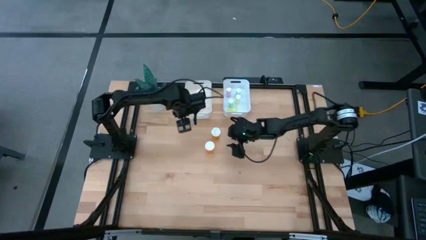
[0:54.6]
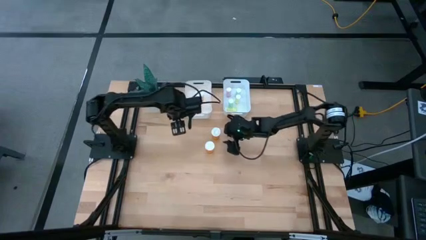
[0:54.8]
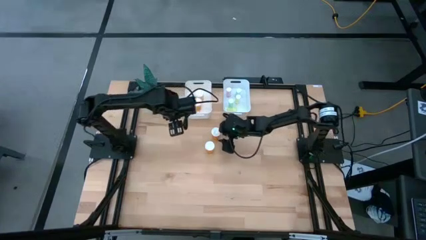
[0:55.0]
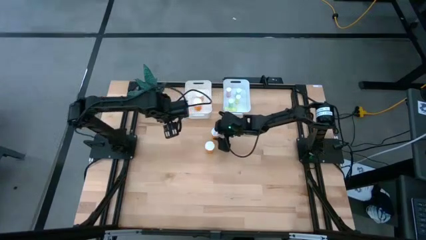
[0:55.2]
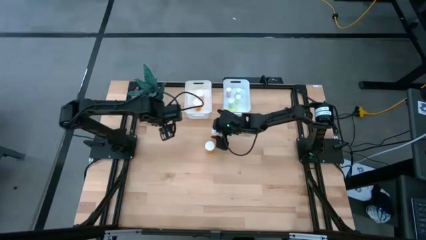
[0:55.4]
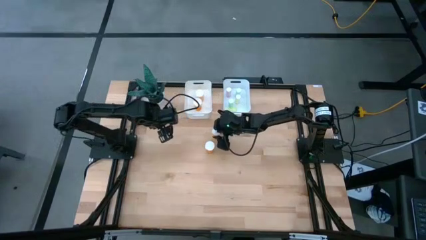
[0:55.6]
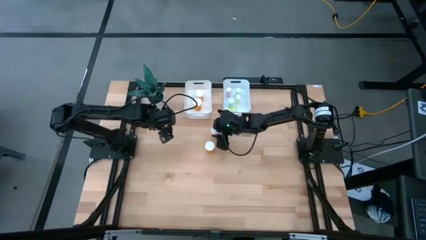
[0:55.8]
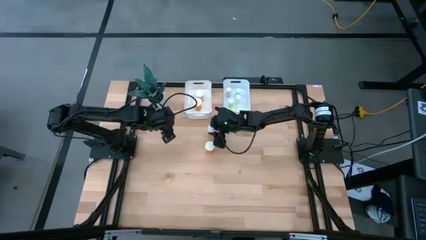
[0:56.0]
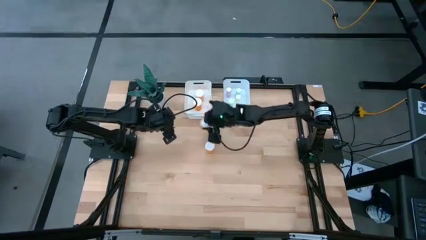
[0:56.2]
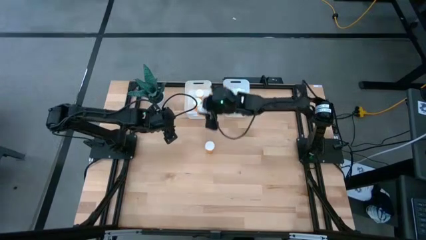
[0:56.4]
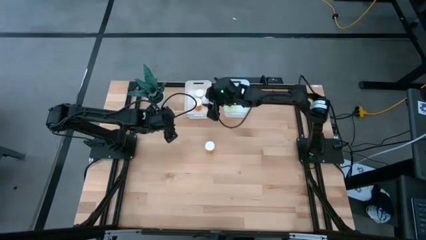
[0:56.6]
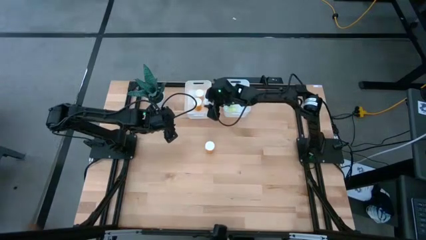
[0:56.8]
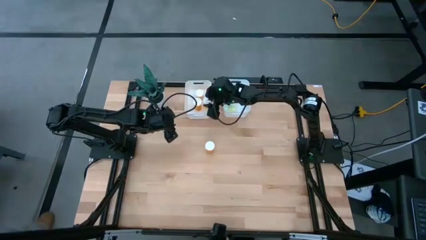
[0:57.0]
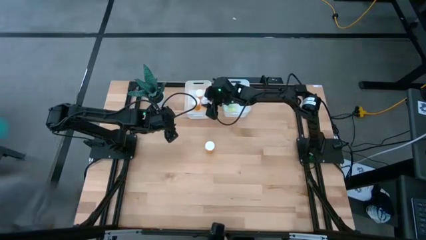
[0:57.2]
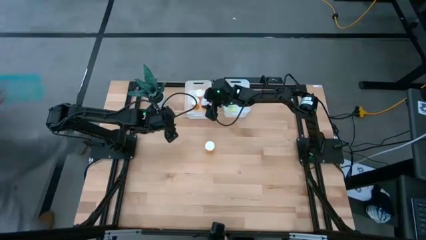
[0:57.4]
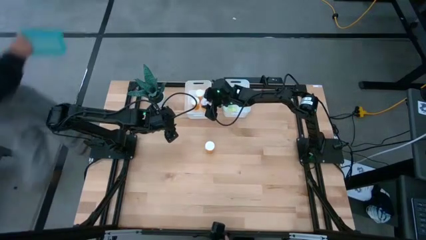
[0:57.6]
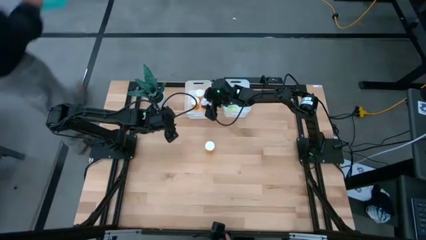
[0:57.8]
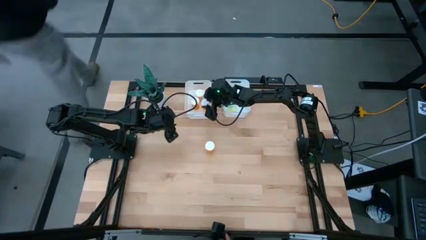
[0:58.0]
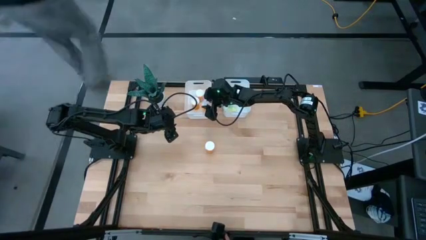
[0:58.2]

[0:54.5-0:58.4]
Task: Pick and place medicine bottles into bin by pill shape (circle, oval)
Put the large orange pill bottle into the left white bin

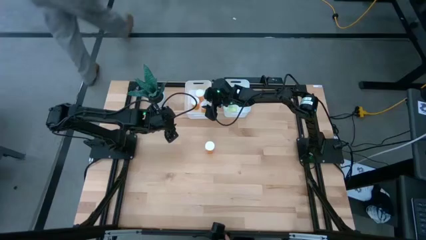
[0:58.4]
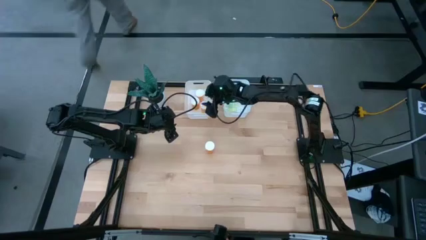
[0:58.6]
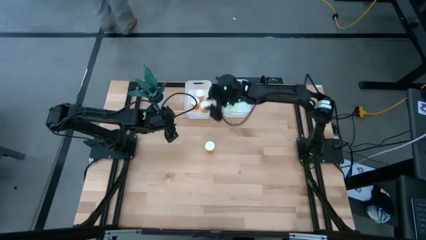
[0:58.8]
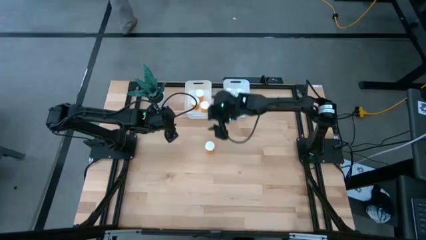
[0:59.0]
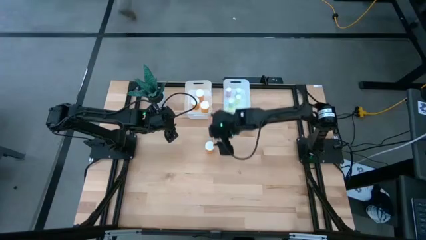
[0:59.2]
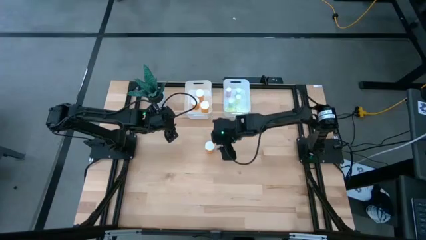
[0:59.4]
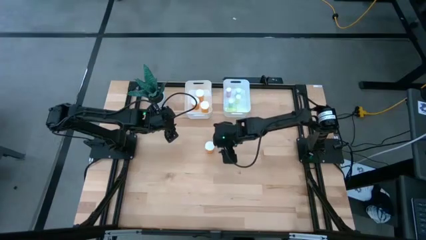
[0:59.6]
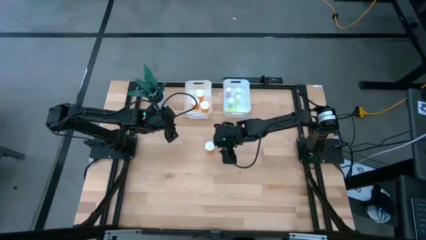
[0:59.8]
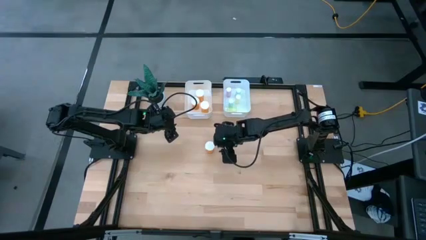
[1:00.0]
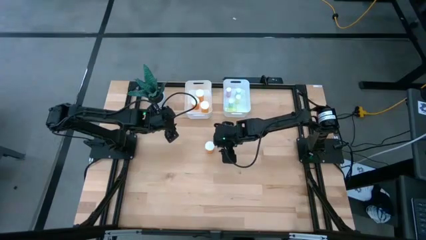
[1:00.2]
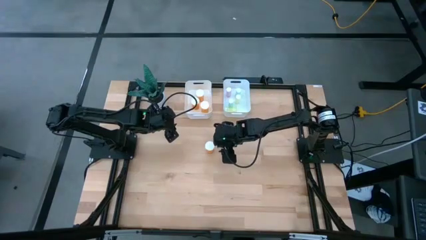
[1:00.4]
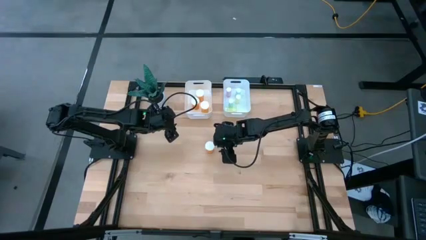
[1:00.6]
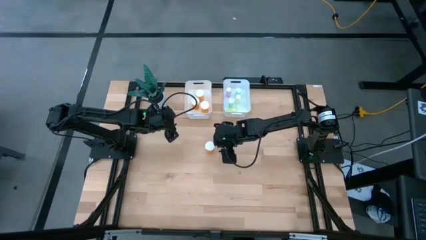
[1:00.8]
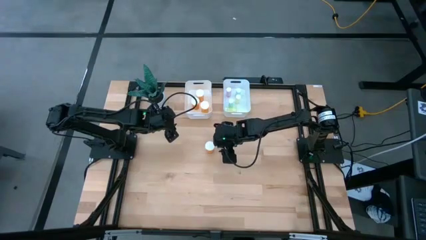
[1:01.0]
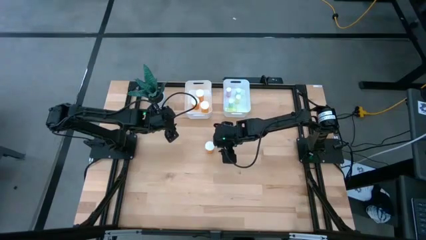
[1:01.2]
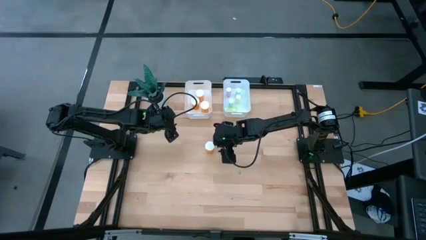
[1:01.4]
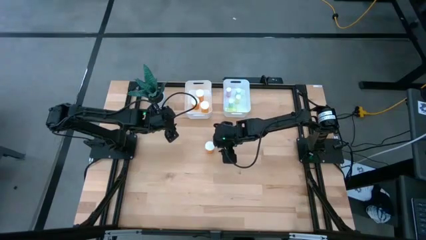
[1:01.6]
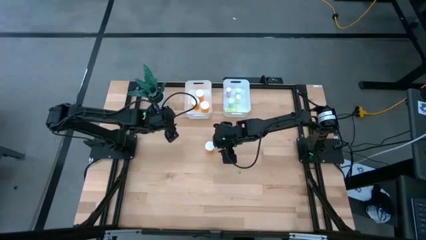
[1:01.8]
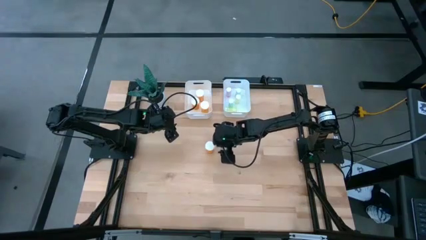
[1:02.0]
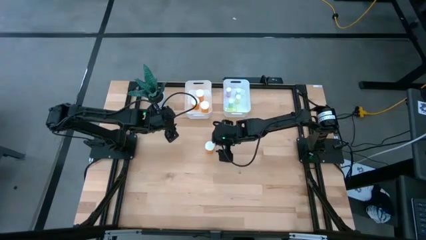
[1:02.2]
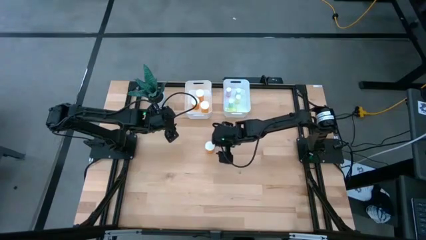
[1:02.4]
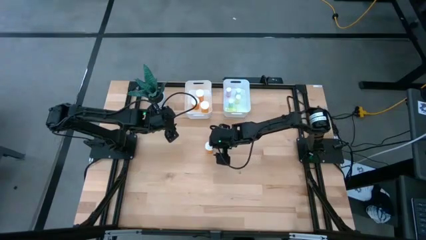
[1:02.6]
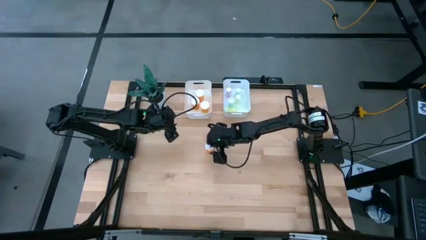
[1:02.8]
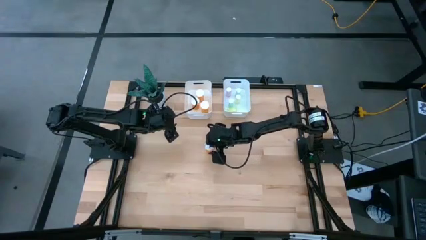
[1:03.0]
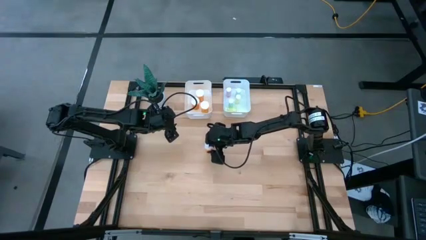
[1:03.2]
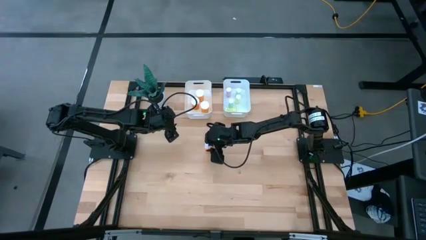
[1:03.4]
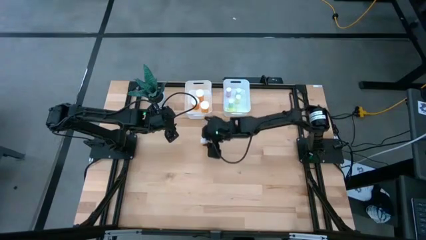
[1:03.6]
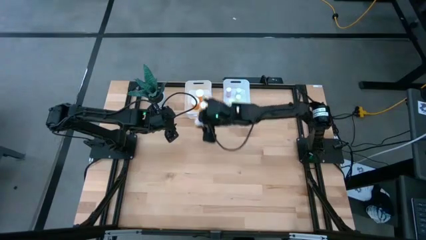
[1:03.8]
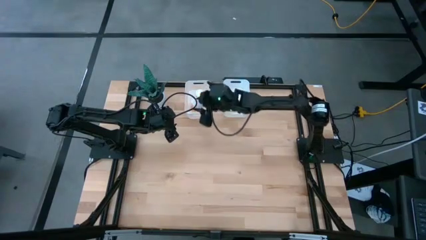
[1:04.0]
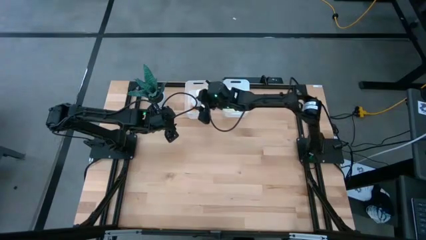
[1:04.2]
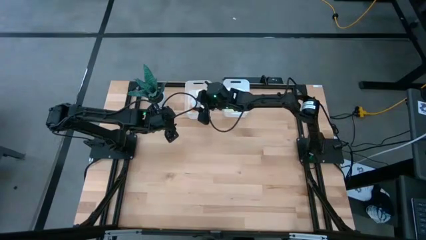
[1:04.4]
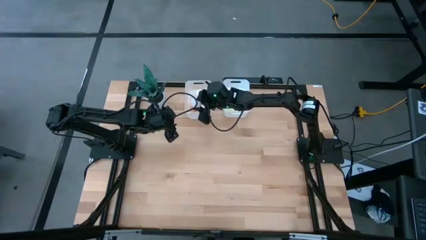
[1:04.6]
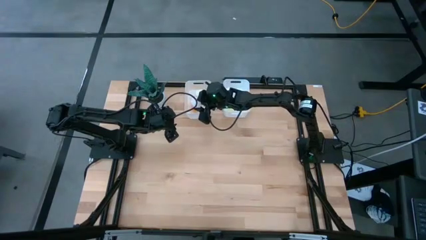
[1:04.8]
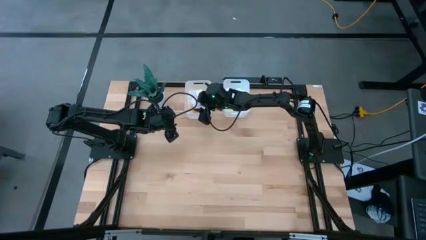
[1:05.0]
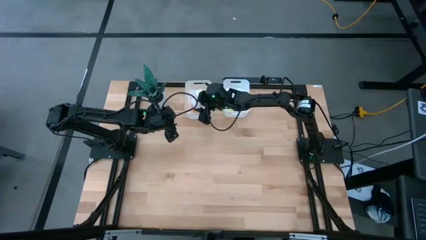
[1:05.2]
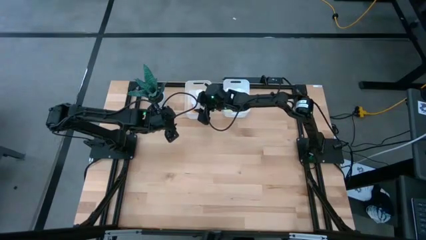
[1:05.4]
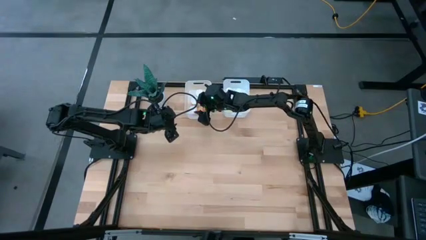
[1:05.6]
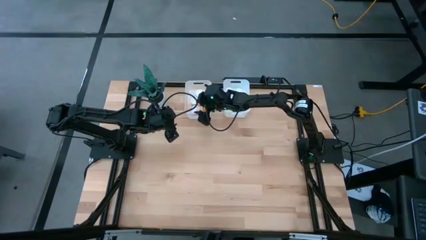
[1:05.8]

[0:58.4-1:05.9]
Put the large orange pill bottle into the left white bin

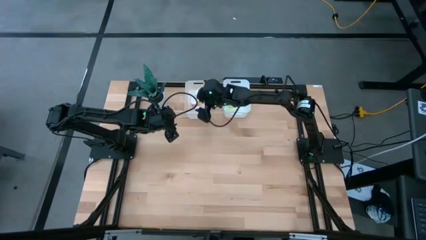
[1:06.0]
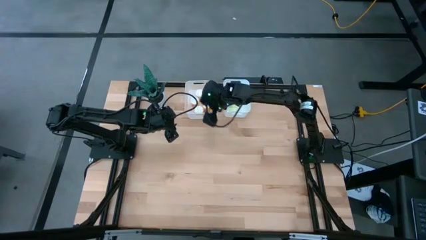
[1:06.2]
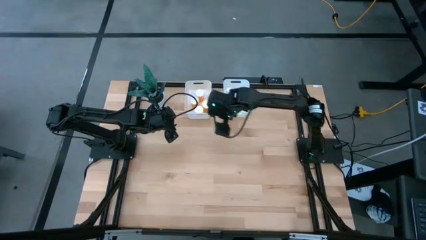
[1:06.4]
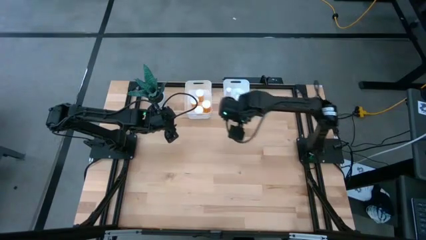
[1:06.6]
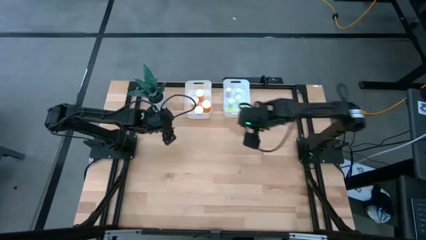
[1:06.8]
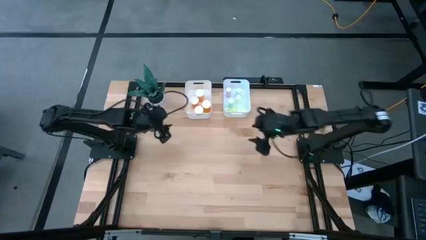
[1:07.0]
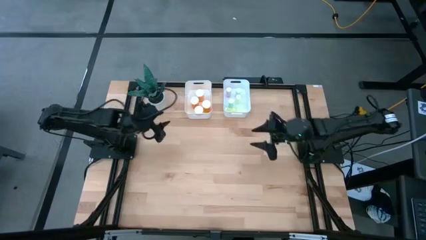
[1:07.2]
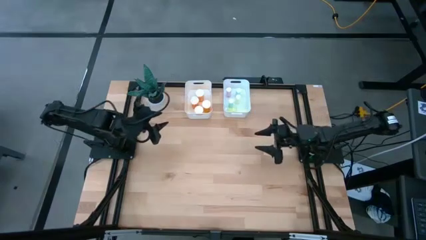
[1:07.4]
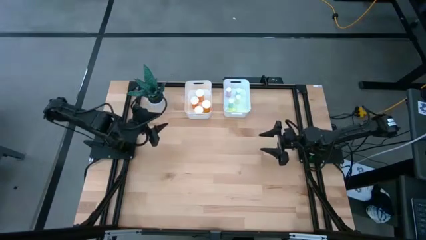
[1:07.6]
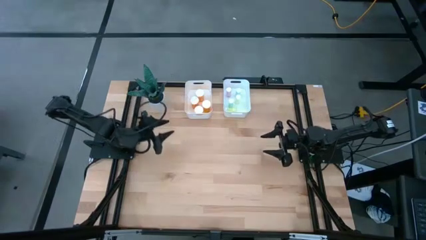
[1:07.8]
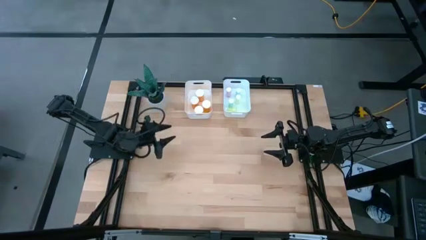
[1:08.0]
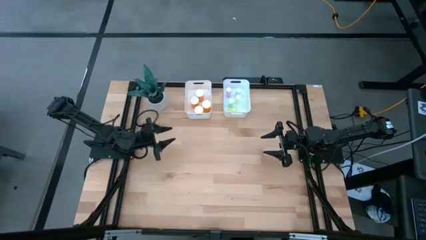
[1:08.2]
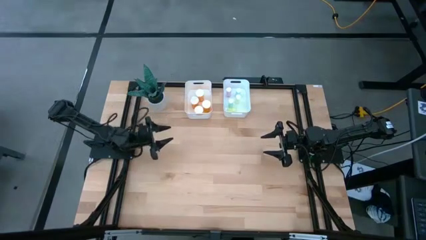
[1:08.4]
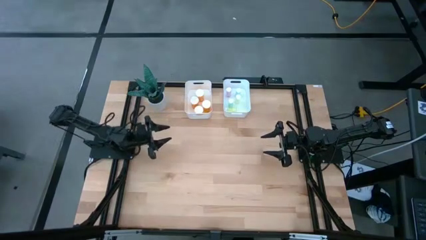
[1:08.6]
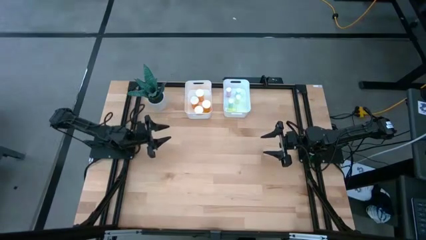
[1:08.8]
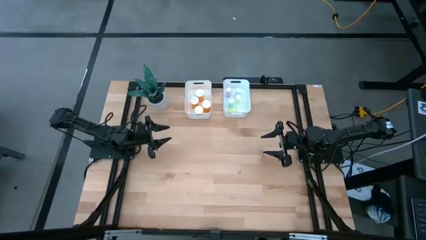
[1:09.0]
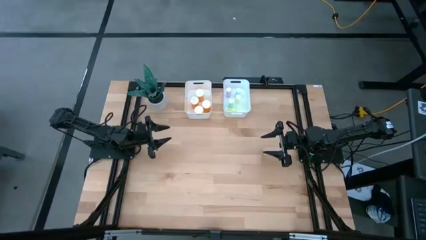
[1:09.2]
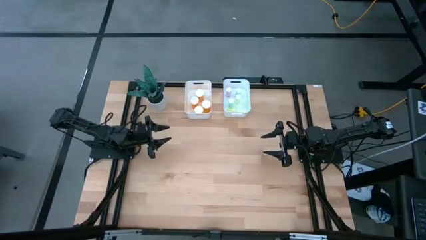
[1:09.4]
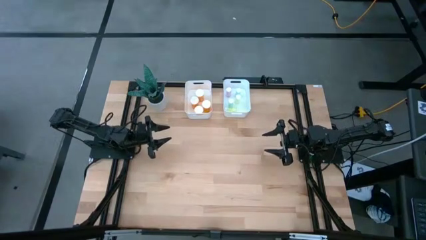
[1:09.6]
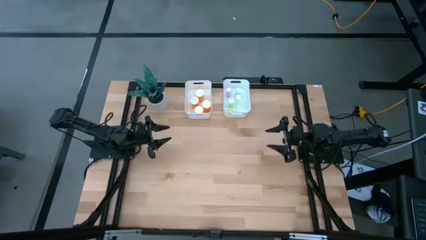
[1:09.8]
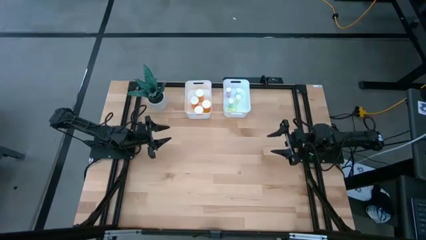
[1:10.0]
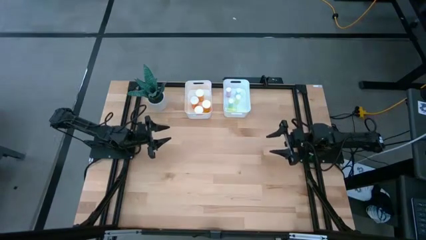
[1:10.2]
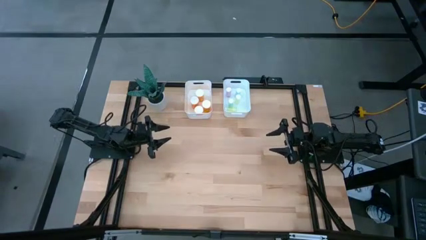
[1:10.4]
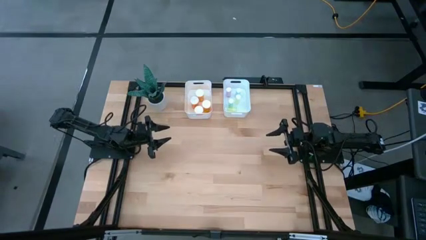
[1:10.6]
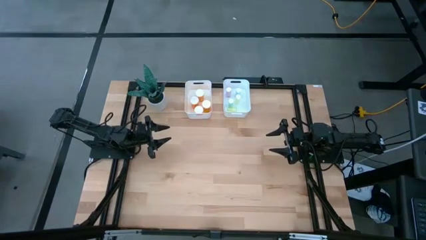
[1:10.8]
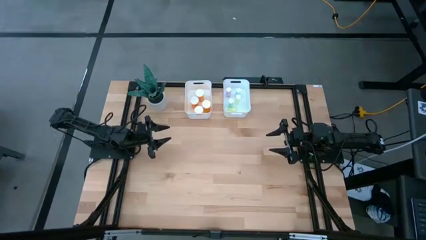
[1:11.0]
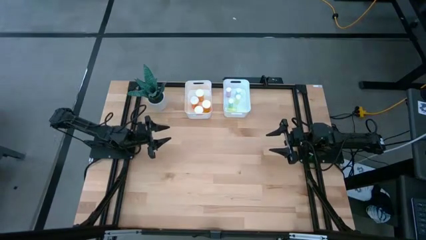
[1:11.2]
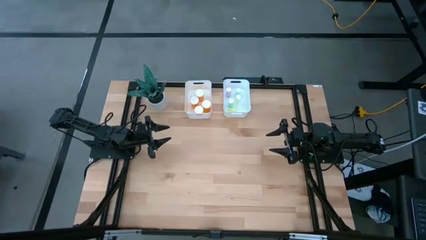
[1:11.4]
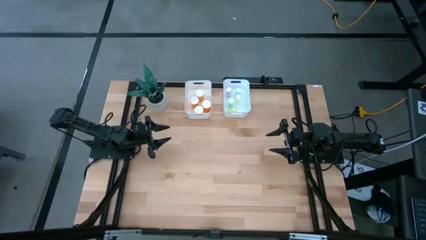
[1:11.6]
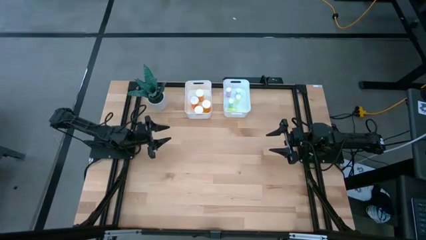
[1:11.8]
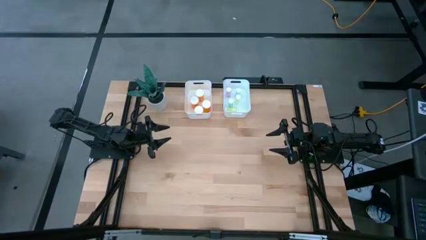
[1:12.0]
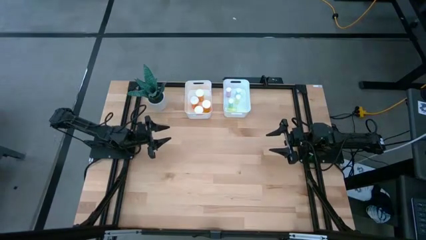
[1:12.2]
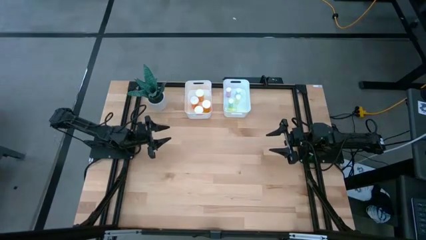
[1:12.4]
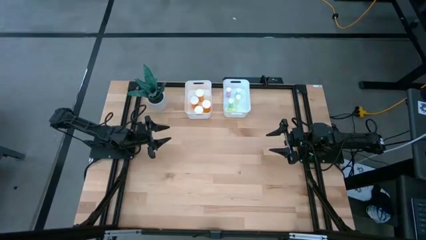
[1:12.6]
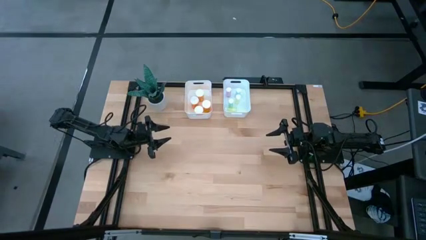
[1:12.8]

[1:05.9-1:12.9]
Return to Home Position
